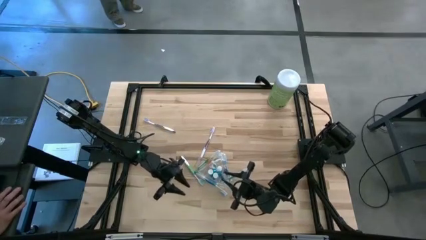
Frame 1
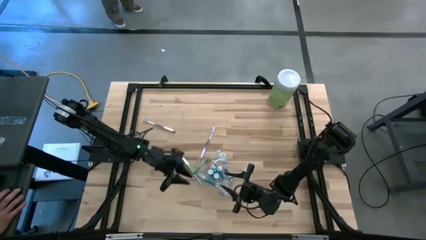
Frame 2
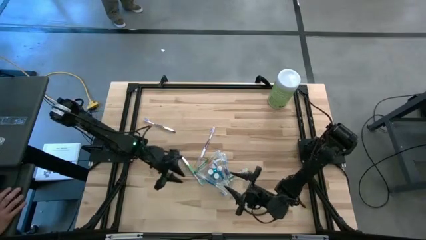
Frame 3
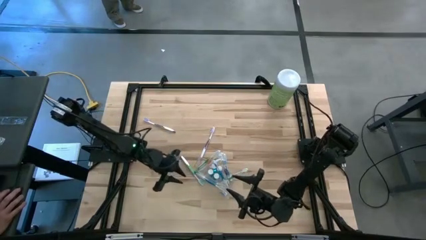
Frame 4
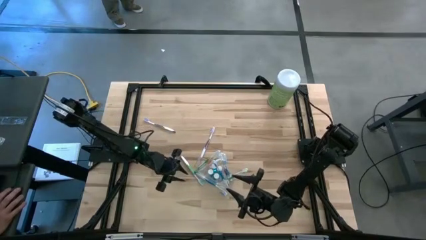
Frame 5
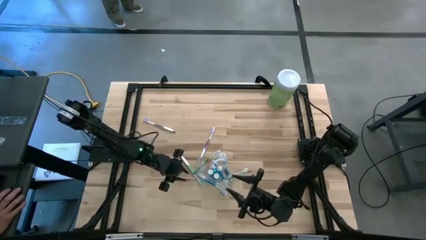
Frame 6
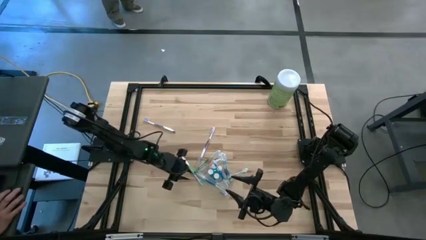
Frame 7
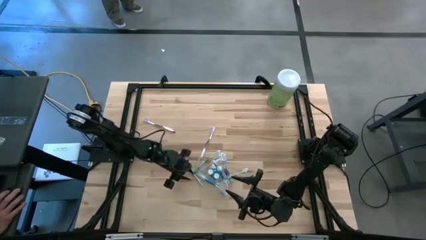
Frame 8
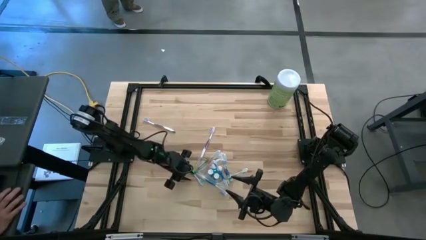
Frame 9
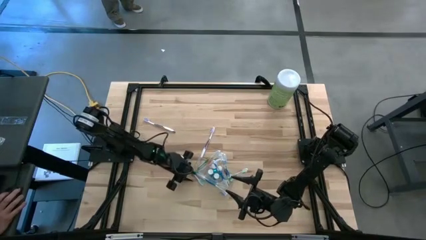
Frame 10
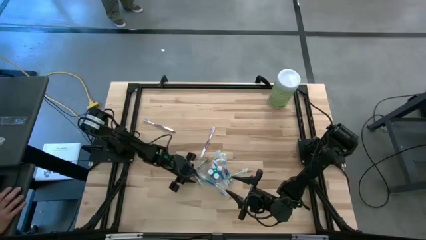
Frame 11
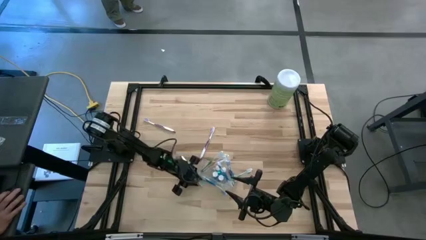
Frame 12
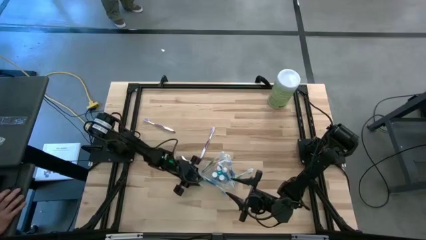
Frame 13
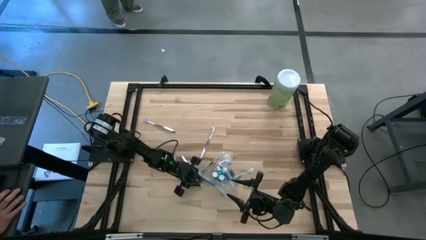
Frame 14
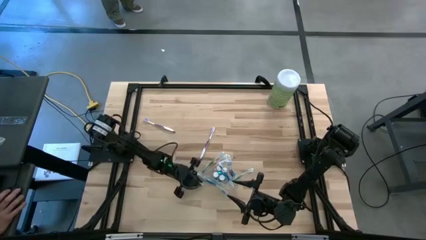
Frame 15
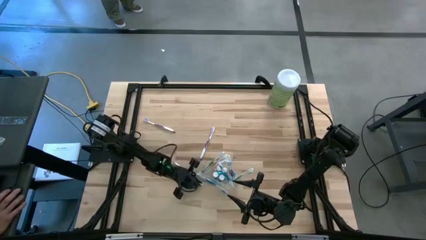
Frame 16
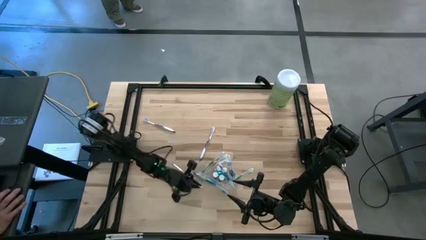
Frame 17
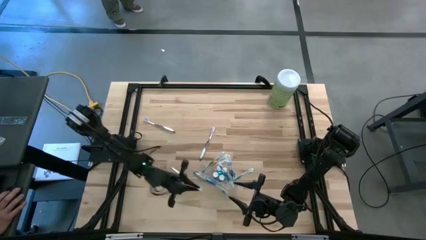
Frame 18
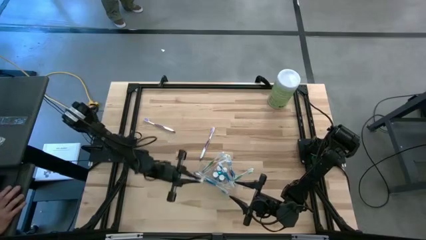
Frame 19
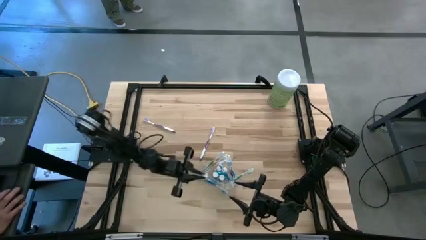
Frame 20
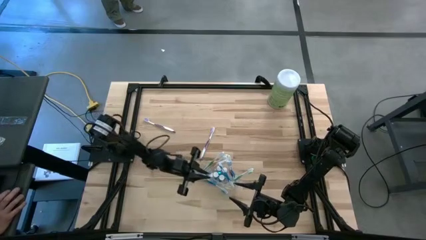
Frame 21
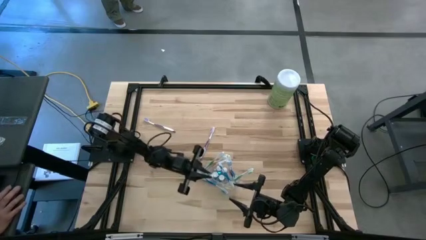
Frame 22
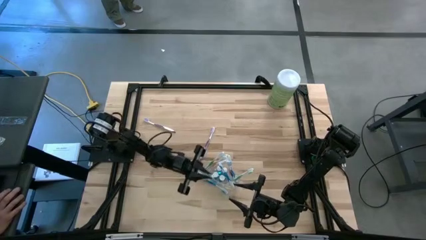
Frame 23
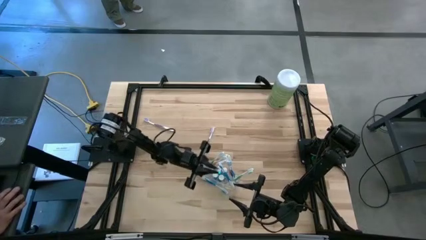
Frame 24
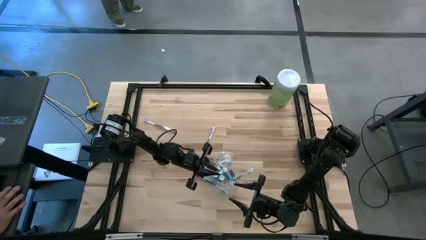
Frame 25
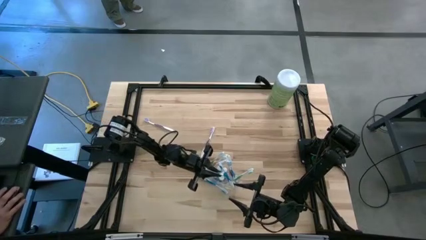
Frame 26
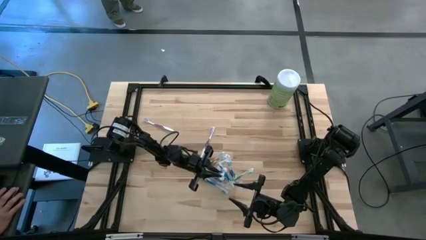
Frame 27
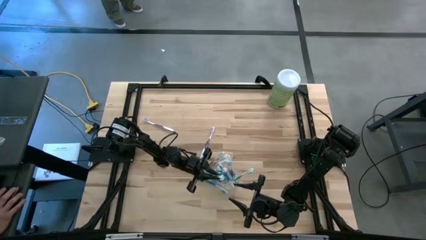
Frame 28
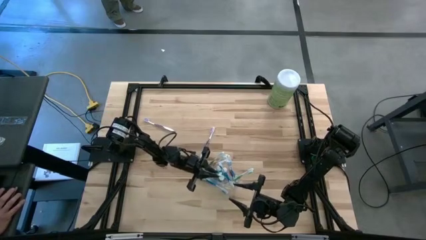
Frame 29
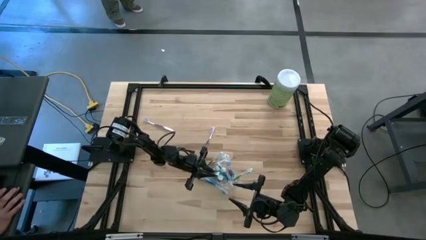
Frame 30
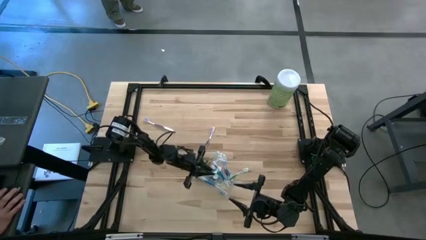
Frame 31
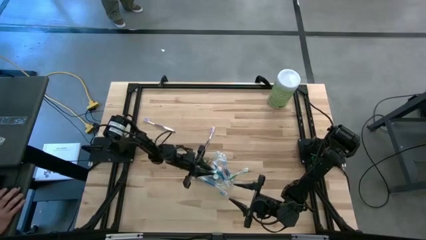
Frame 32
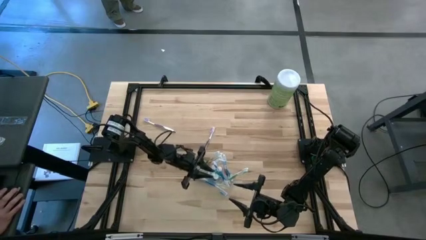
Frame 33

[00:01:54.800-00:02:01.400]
Task: Pick & Place toothbrushing station
Put the green toothbrush into the transparent organizer

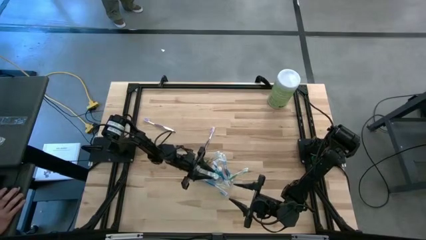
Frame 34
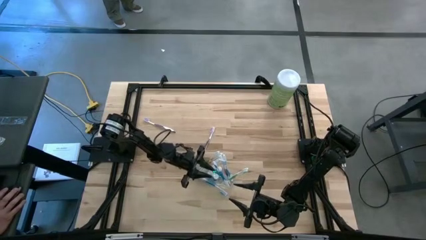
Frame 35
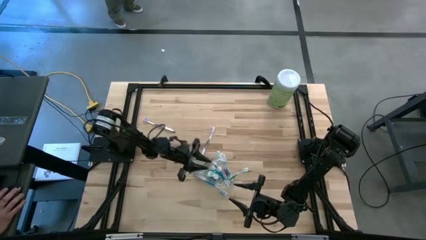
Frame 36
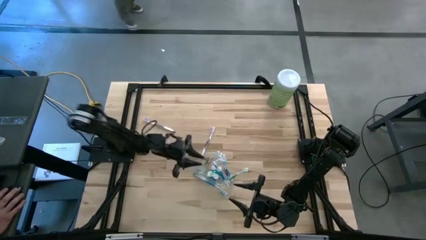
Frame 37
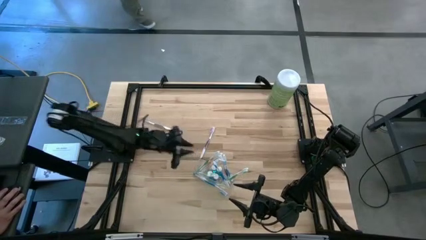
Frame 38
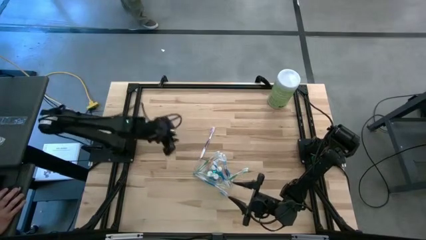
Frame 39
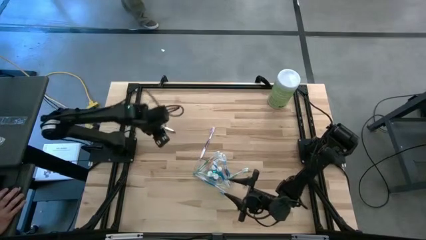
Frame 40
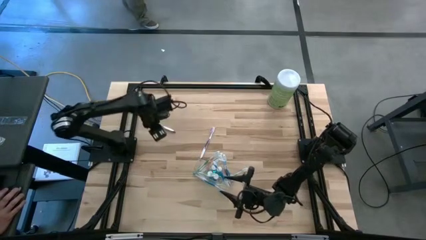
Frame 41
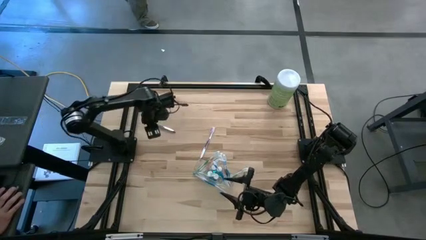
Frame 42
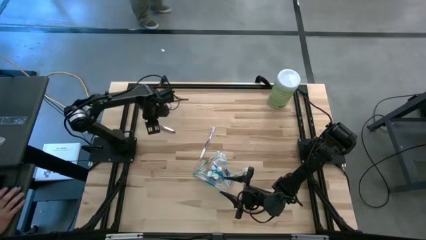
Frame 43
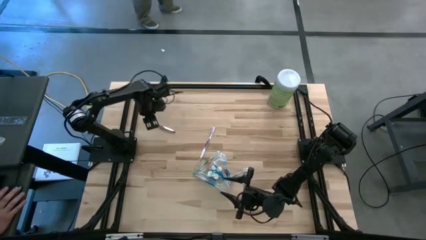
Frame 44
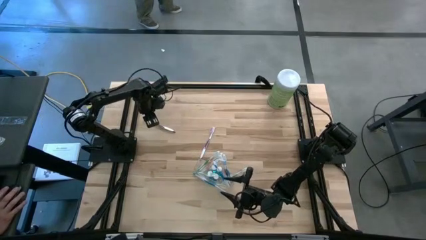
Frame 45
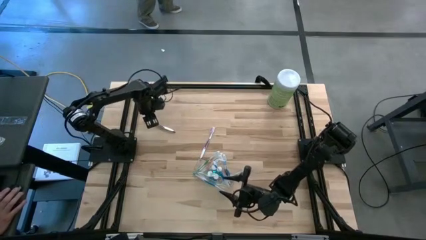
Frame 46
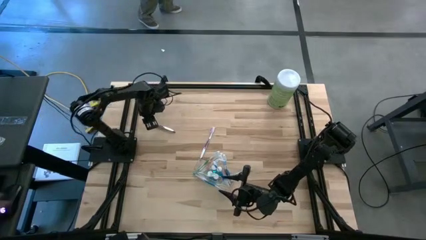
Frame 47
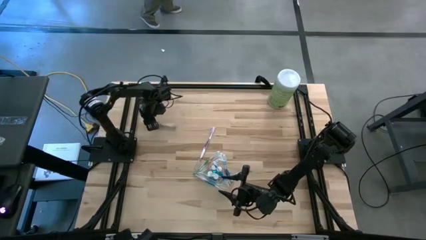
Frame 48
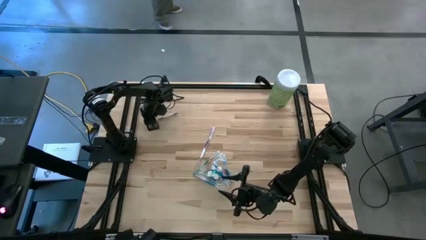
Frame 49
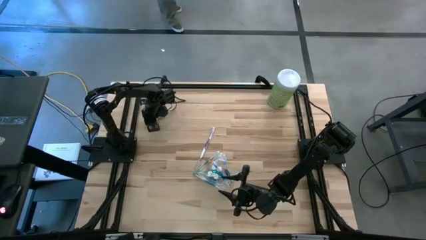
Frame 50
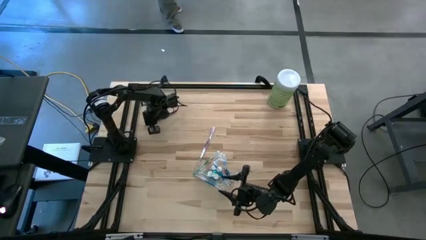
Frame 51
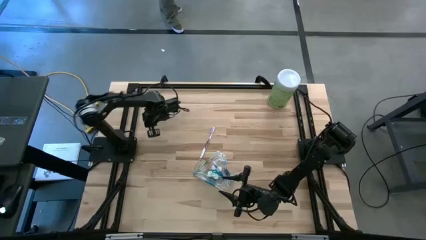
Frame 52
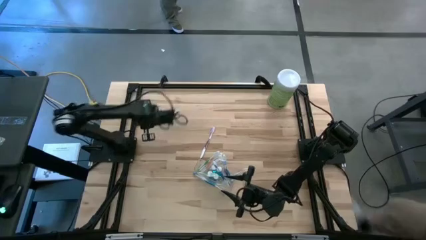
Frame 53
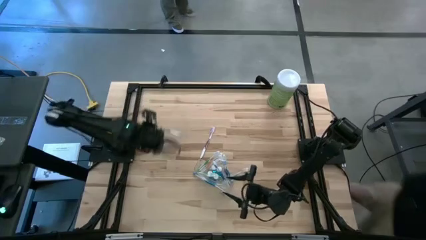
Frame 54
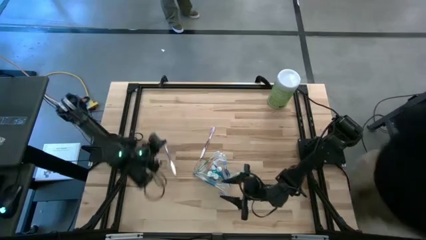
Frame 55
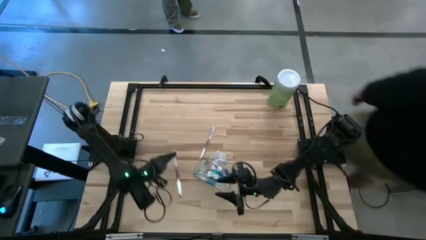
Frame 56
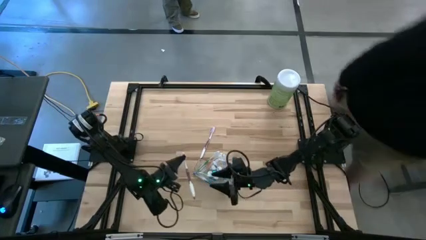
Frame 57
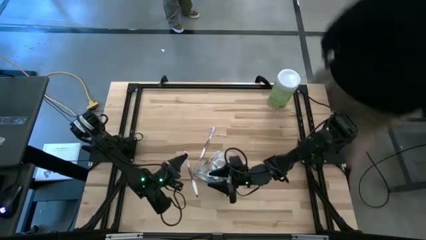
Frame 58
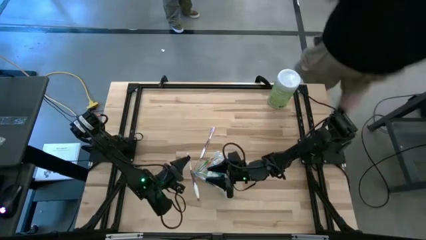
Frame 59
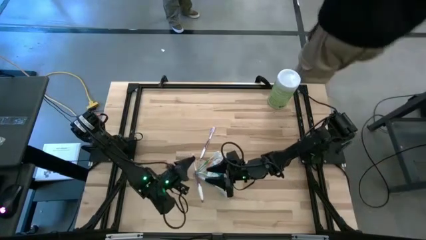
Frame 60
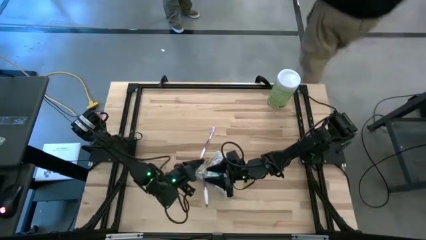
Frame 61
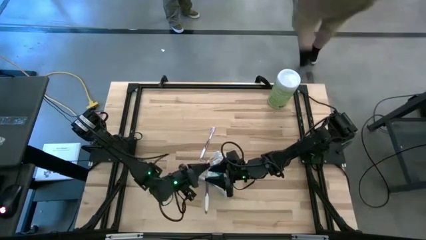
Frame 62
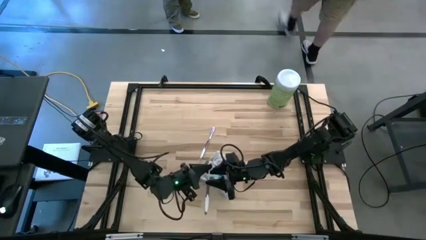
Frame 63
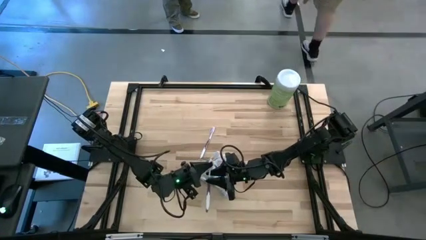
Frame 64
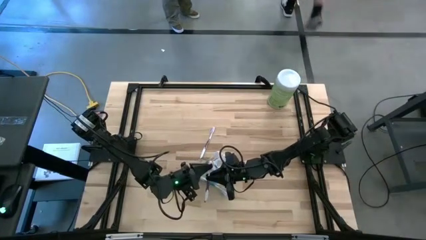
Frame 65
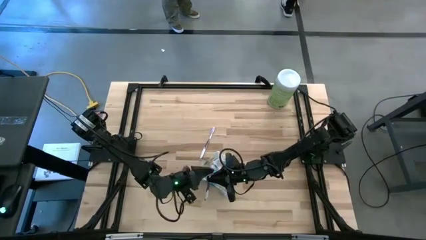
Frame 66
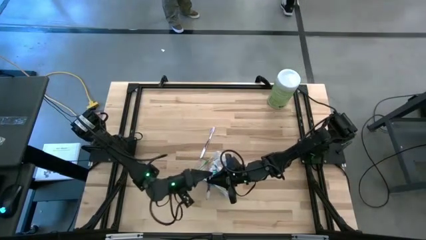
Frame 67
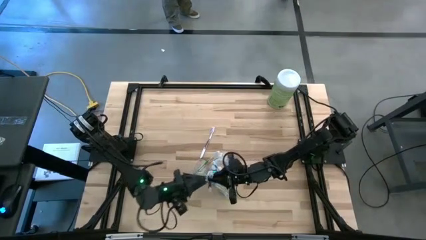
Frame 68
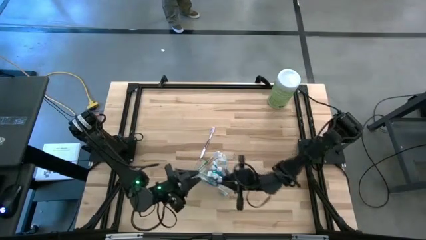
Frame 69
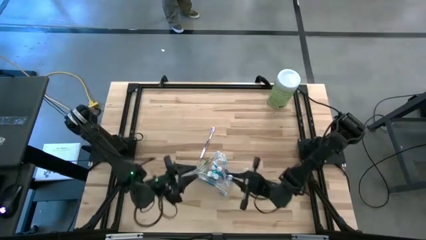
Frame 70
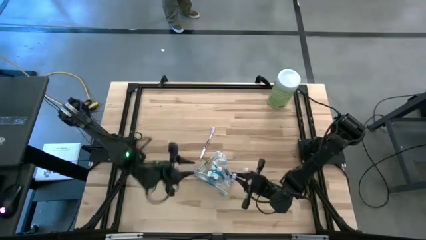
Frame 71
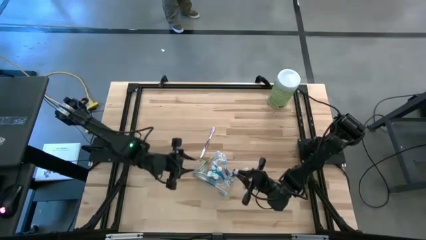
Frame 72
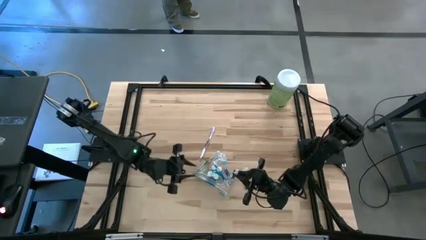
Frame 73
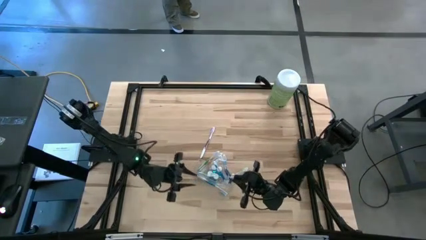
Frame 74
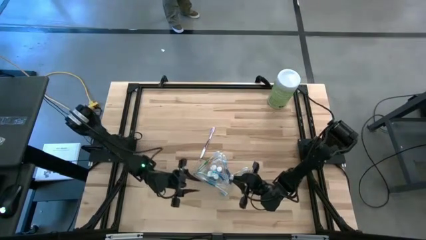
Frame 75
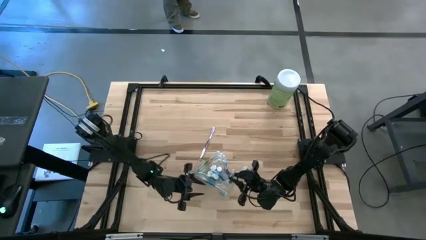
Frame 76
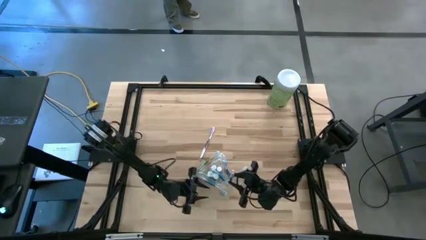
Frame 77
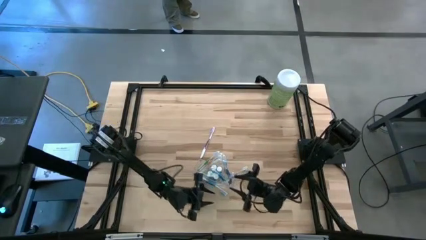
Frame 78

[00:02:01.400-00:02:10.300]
Put the purple toothbrush into the transparent organizer

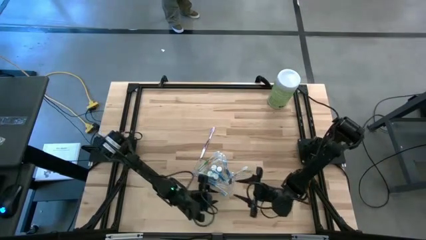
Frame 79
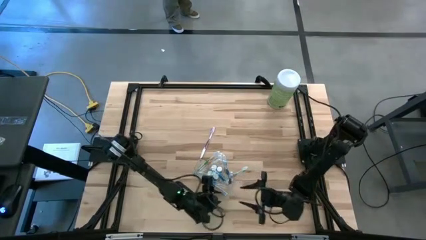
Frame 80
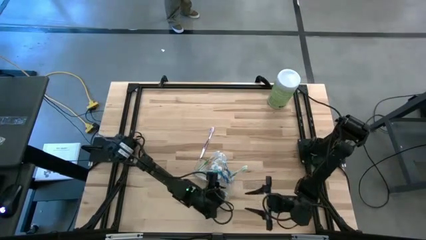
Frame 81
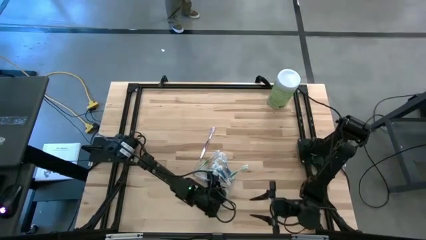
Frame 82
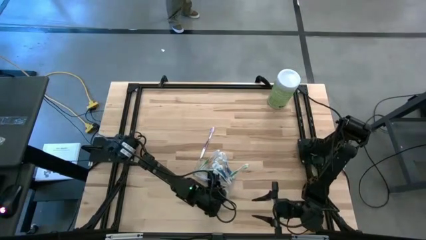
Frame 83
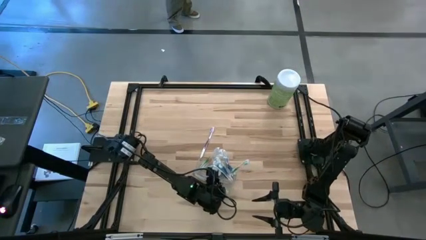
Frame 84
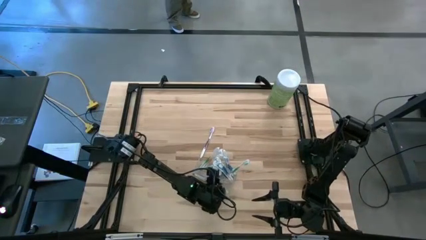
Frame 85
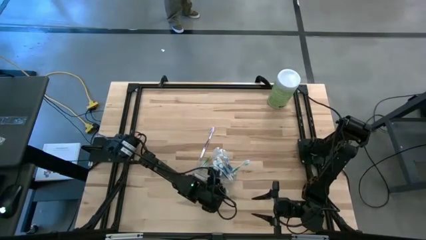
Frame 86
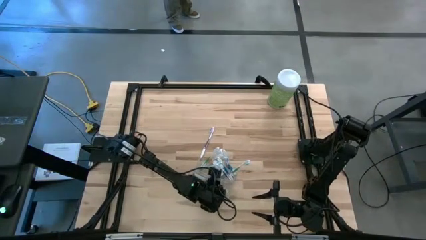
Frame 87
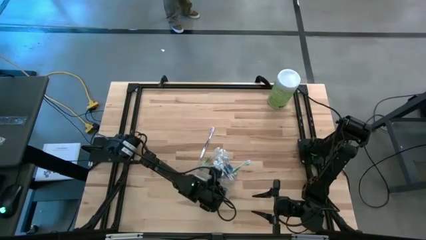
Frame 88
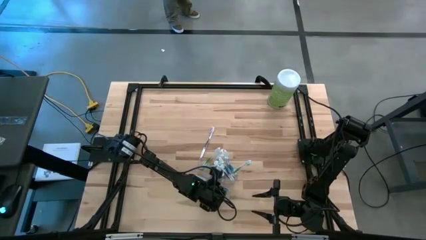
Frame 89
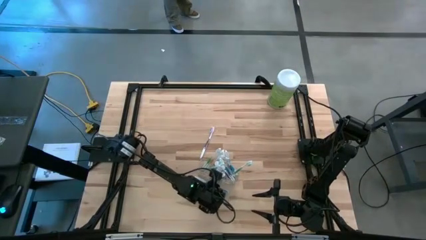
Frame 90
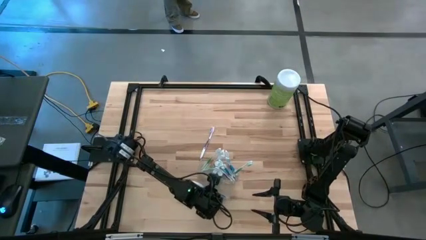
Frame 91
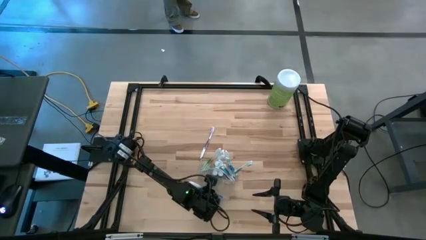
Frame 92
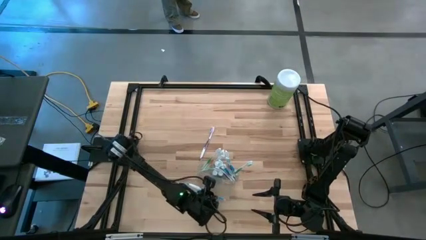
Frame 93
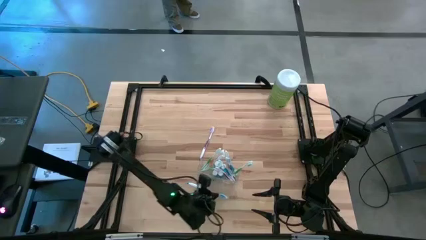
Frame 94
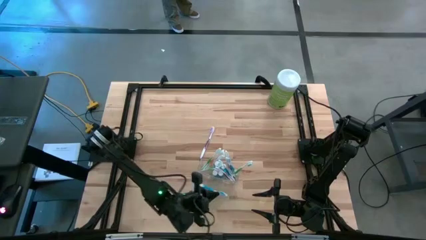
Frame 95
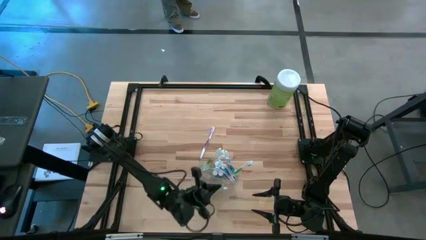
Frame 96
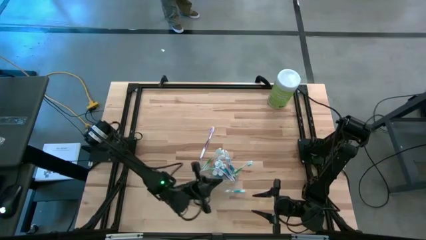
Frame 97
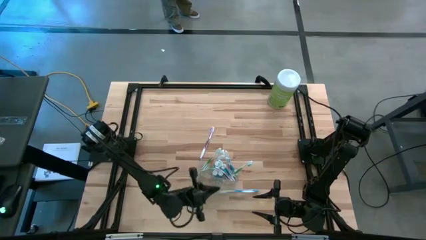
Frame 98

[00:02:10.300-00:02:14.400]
Put the blue toothbrush into the transparent organizer
